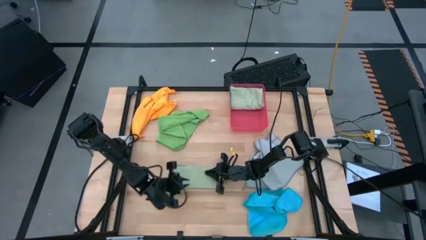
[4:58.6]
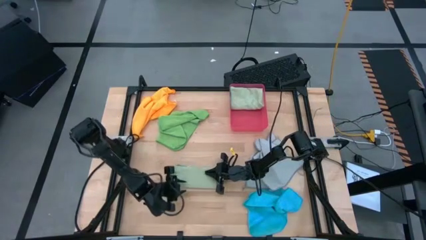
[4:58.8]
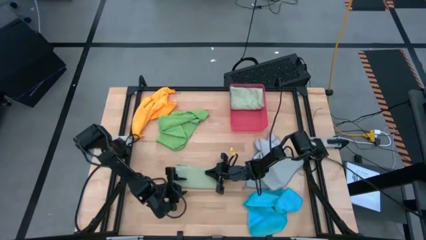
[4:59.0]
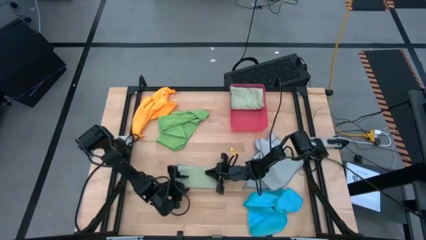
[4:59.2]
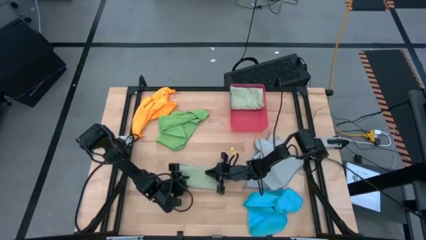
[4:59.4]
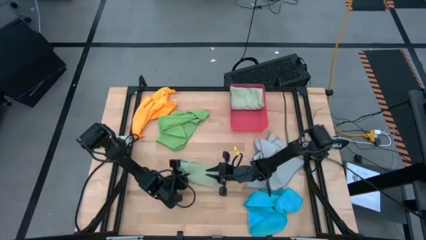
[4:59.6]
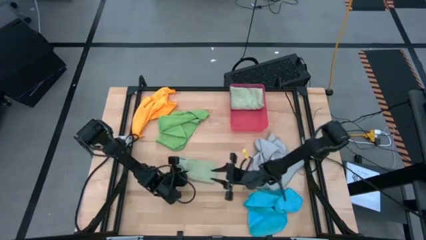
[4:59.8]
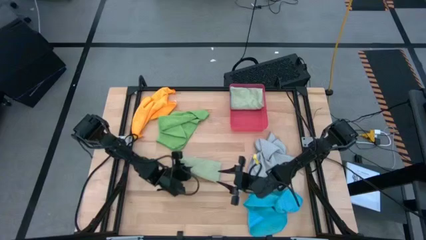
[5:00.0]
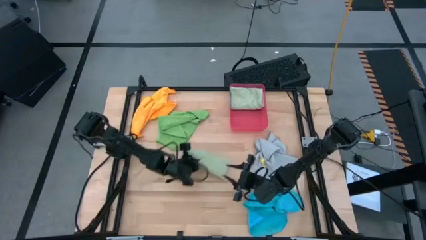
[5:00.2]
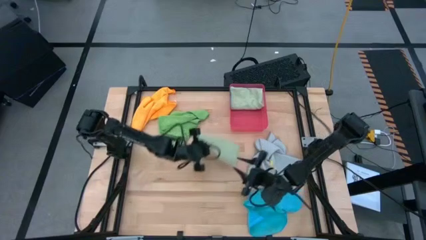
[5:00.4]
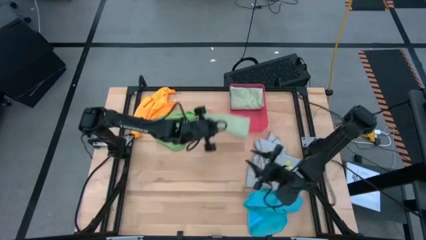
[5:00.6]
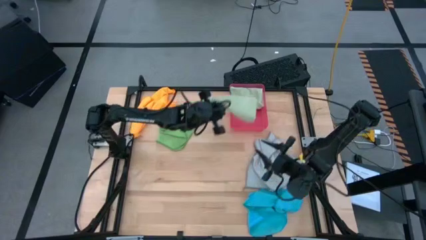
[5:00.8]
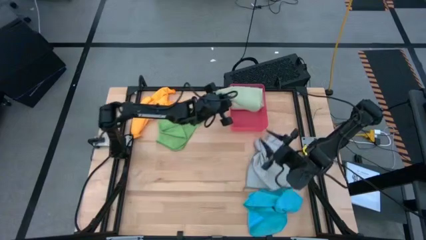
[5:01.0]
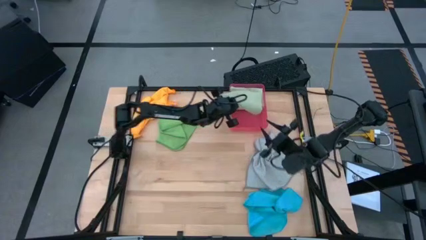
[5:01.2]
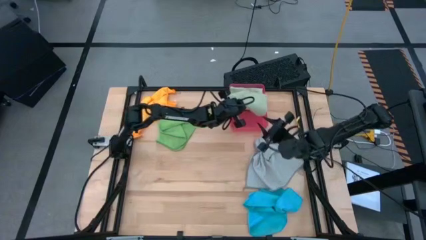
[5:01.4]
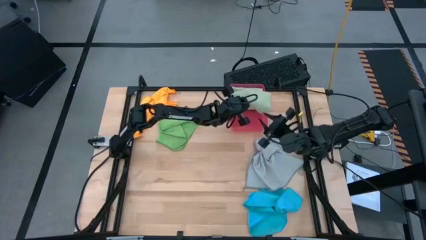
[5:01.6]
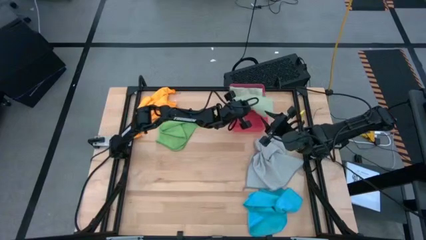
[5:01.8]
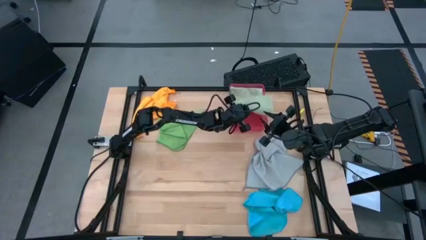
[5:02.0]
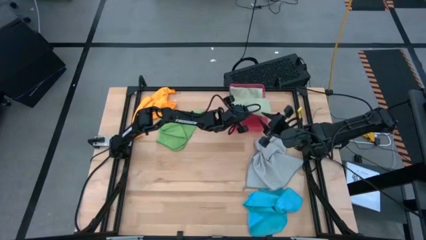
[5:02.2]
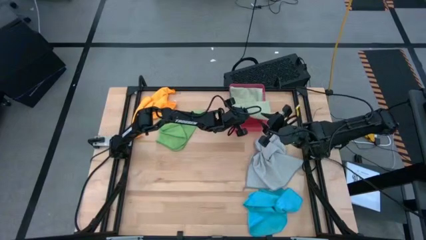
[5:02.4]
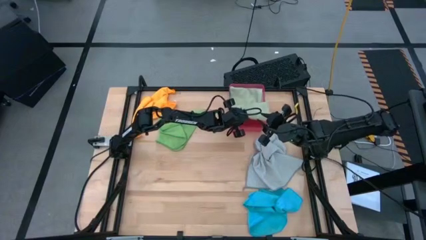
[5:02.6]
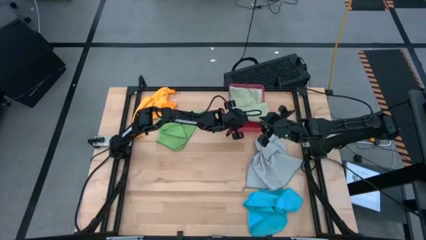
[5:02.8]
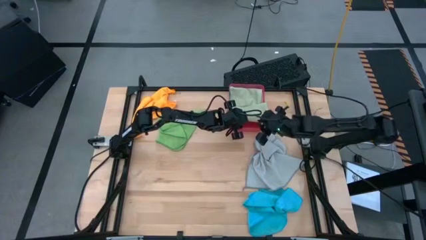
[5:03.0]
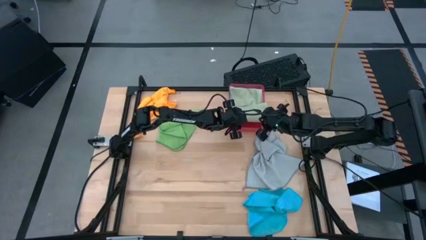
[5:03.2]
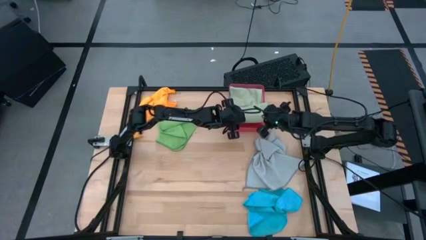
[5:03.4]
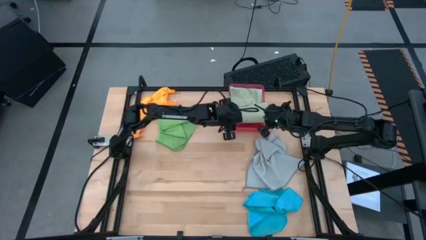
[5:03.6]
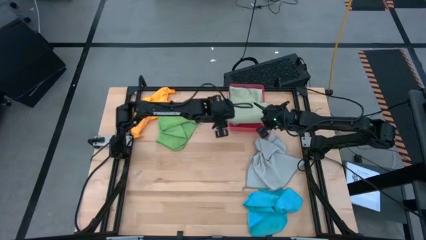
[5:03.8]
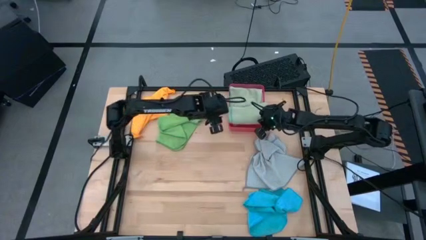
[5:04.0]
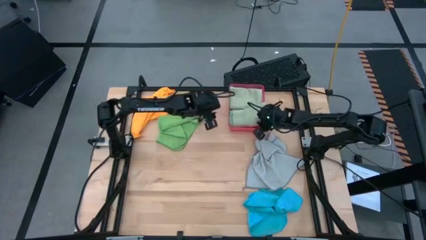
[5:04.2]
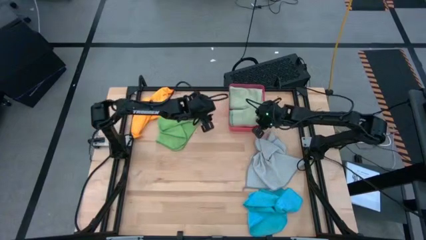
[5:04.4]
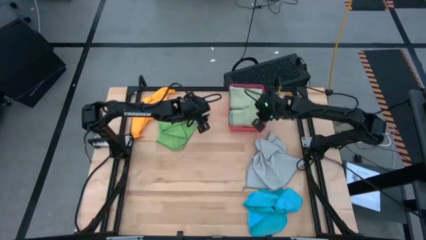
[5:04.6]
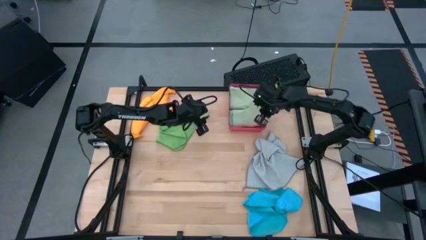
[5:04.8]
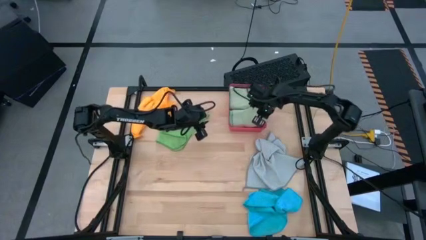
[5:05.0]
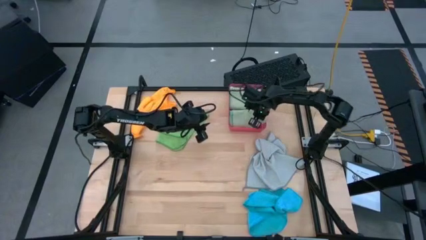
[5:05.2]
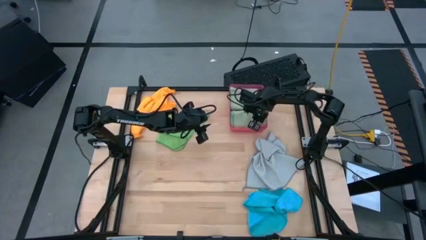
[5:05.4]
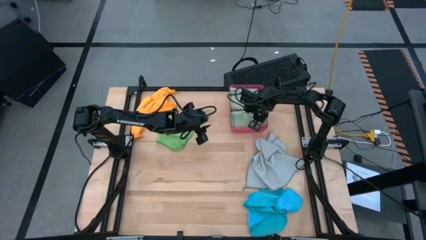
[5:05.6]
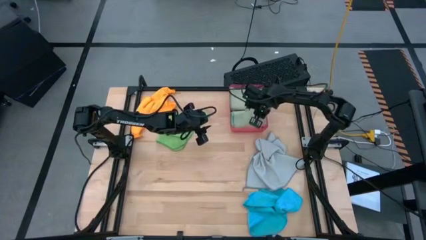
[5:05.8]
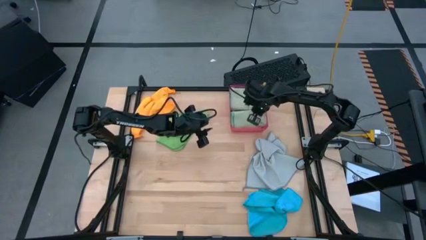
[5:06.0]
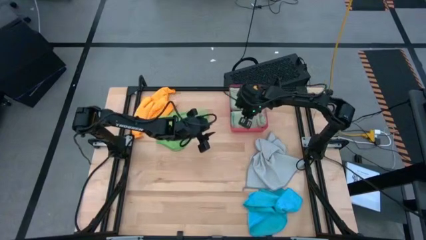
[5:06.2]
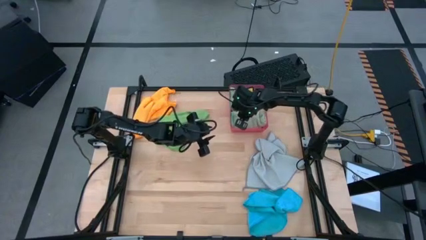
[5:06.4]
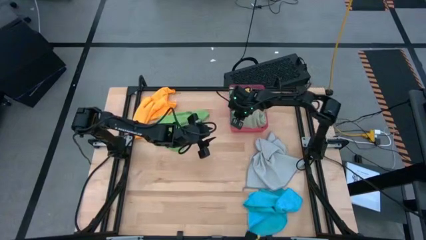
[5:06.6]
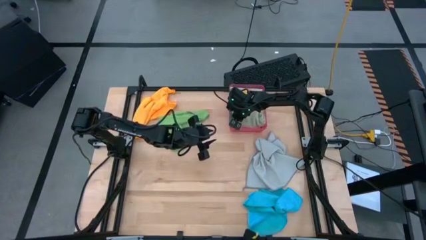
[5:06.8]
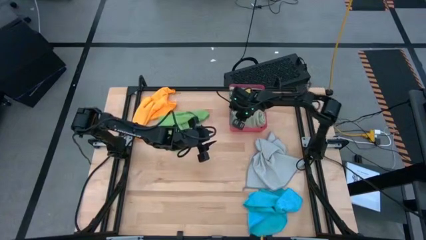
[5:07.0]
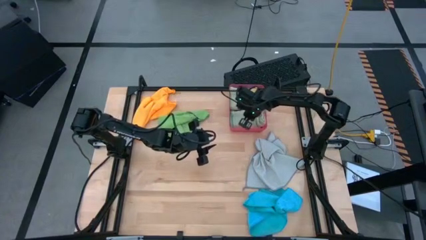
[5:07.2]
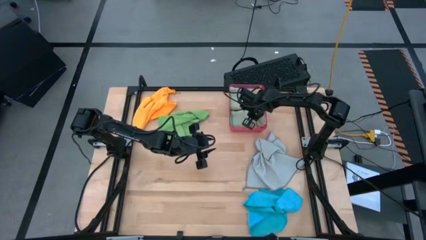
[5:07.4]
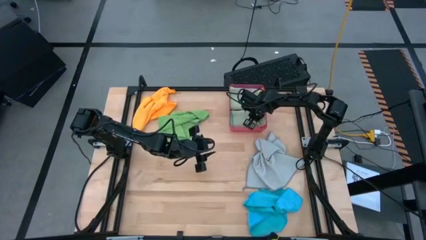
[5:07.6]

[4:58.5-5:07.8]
Task: Fold microfiber towels
Put the light green microfiber cloth into the red bin

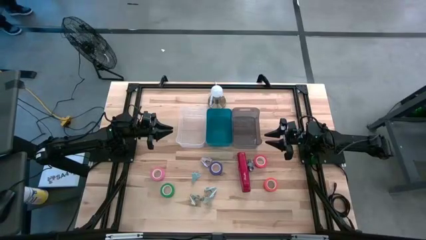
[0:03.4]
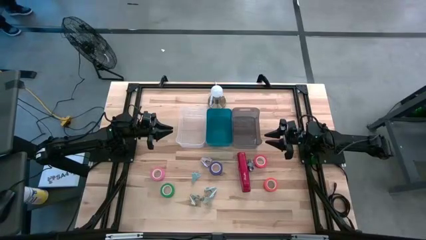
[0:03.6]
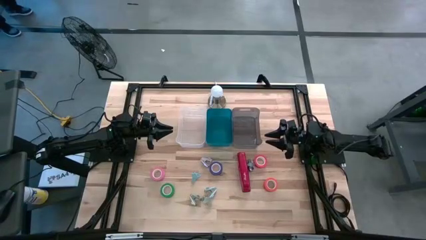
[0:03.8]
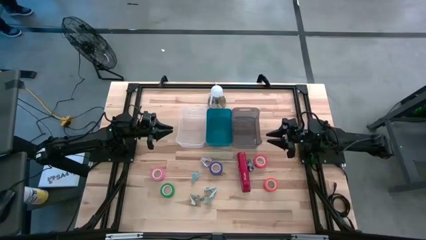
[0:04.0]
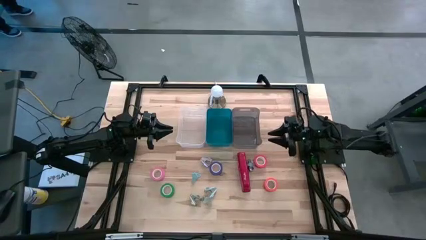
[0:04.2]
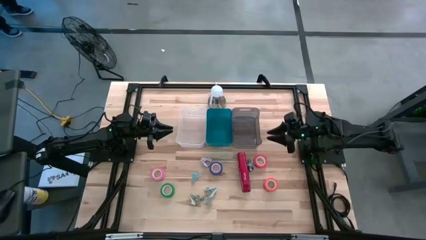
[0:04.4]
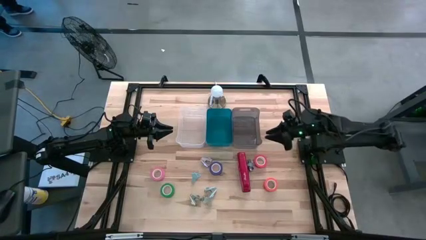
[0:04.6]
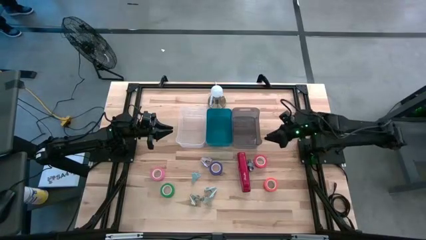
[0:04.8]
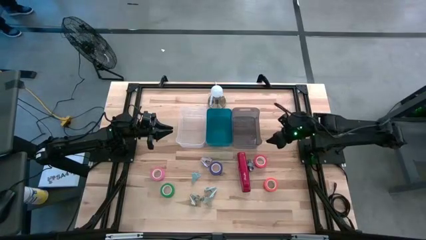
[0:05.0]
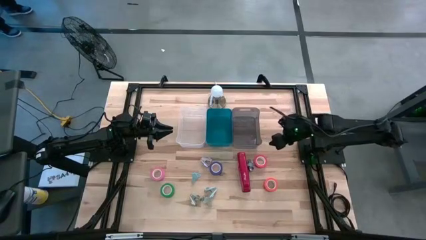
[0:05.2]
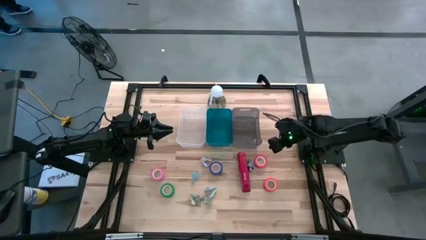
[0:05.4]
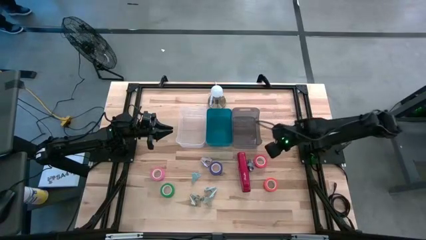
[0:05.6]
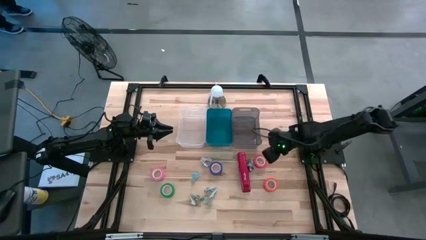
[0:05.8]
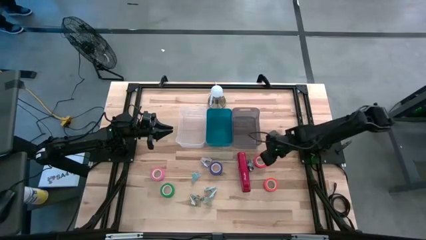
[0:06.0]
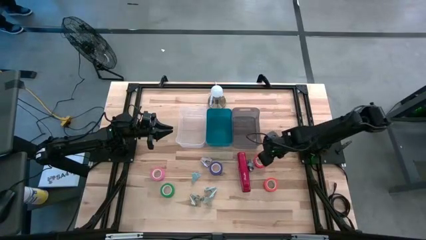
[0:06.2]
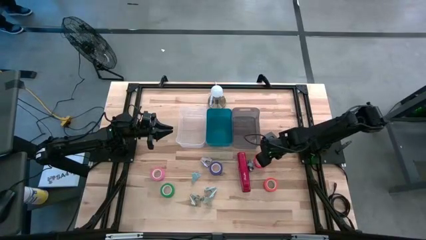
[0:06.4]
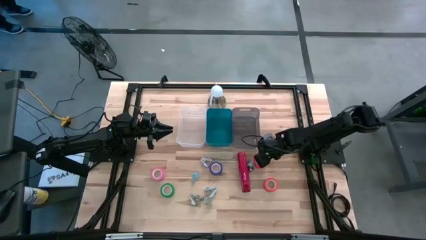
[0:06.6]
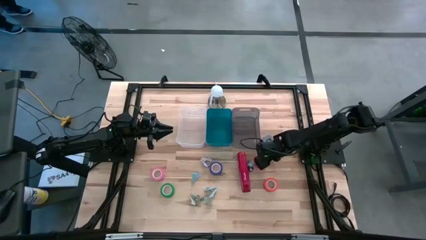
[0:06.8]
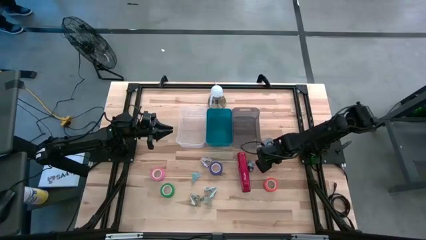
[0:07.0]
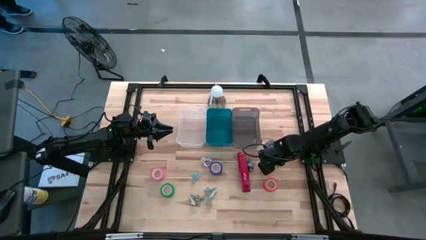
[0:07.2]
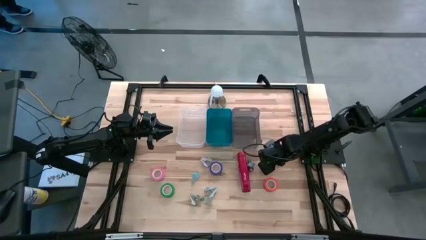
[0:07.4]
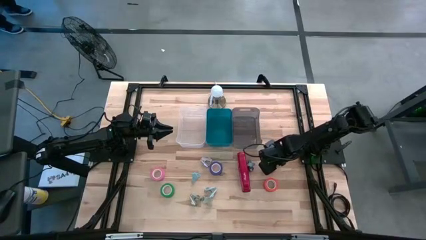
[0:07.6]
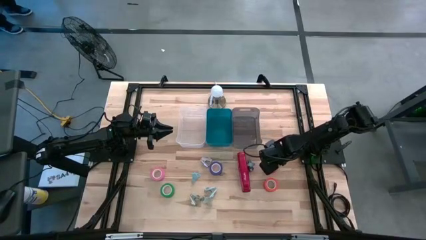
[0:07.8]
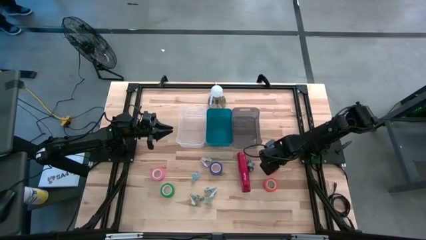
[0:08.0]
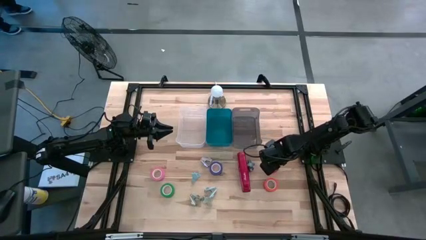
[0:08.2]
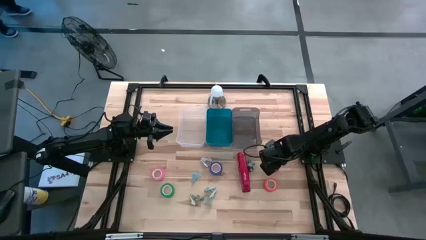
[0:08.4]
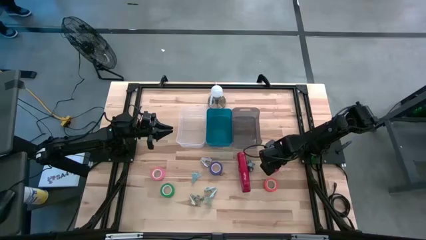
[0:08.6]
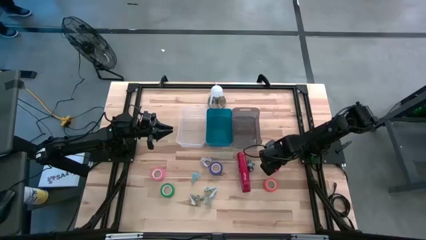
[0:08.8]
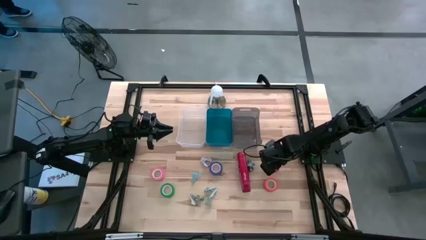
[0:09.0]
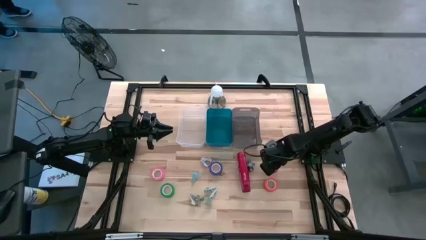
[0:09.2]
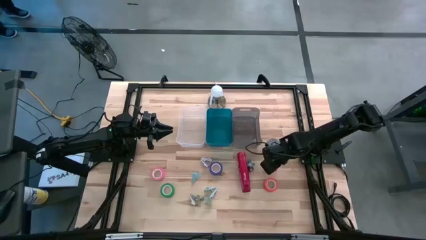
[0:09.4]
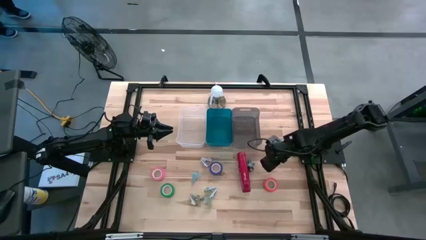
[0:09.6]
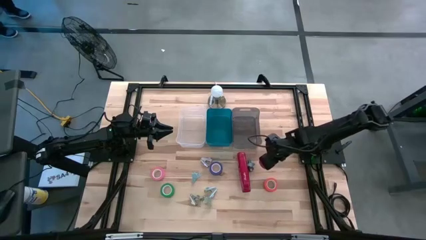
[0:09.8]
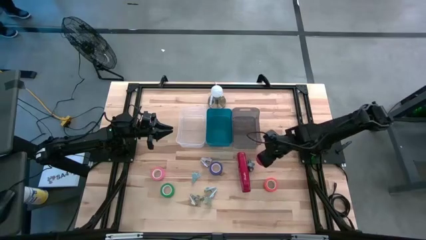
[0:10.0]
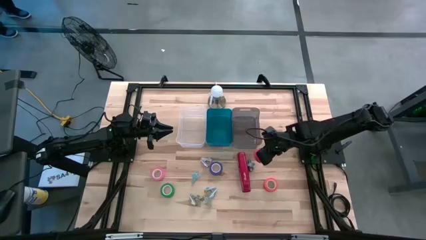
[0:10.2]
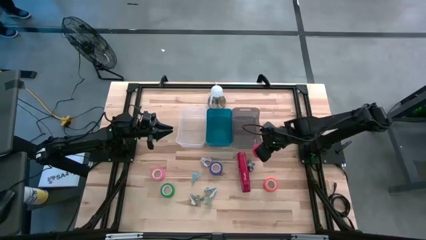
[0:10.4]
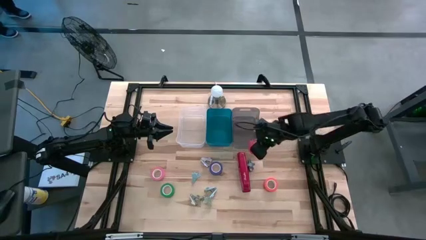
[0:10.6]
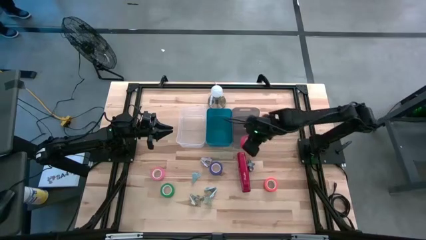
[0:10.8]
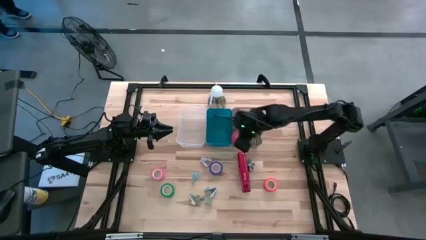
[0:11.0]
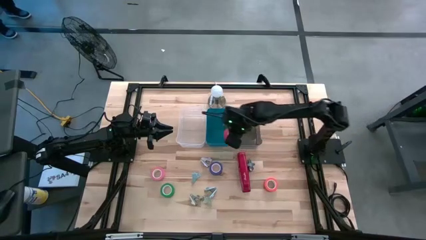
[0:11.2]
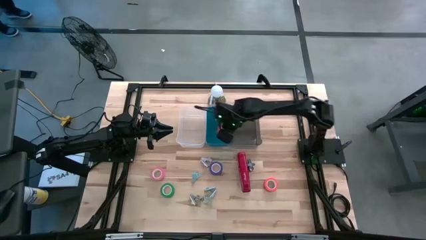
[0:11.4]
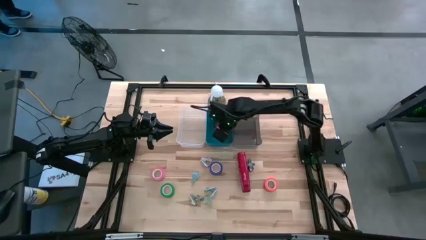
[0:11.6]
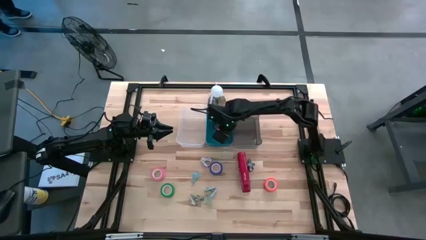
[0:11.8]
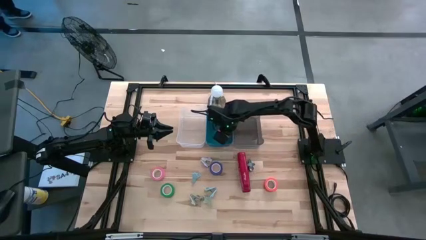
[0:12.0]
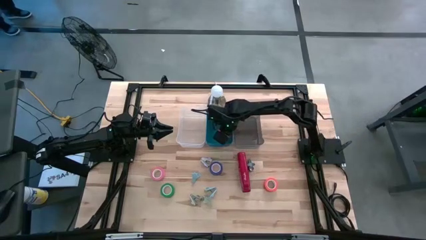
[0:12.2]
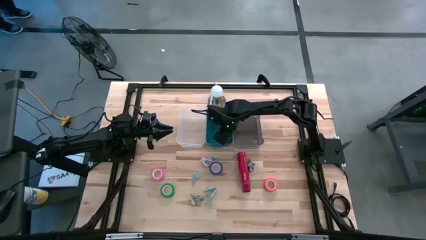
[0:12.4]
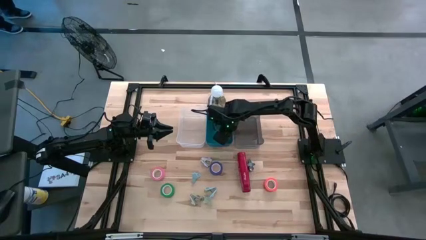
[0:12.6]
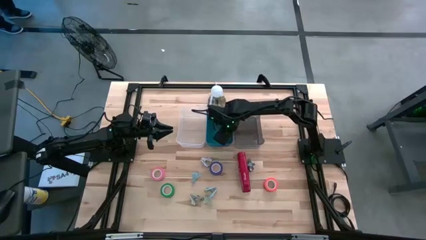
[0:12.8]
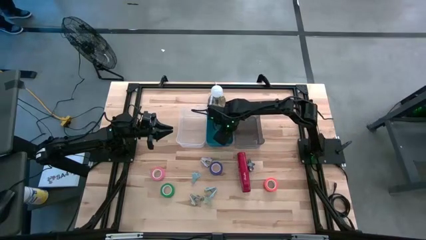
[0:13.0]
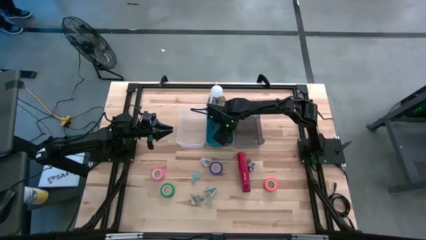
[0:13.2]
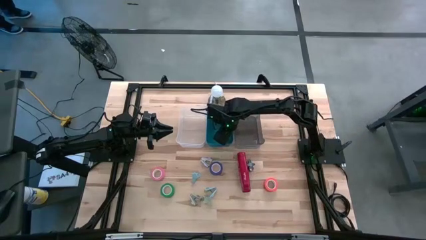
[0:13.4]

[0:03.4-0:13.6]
Task: Pick and place Stapler, Stapler remover, tape
Put the red tape into the blue bin
